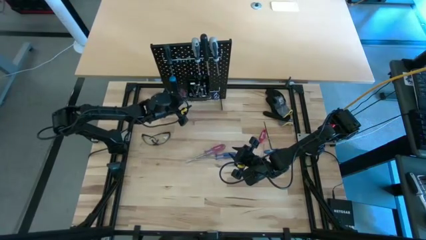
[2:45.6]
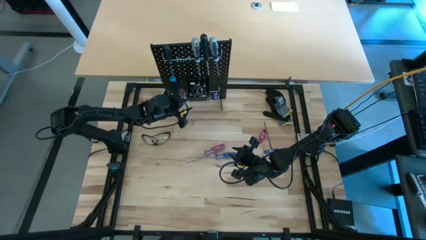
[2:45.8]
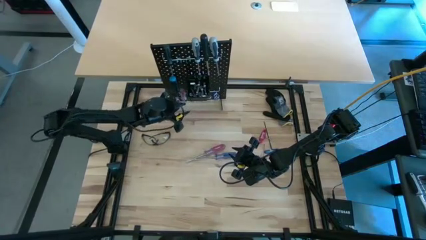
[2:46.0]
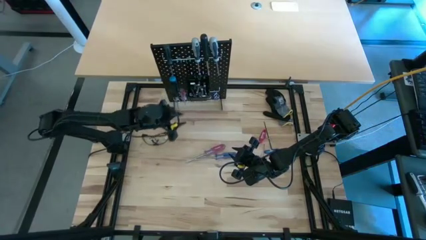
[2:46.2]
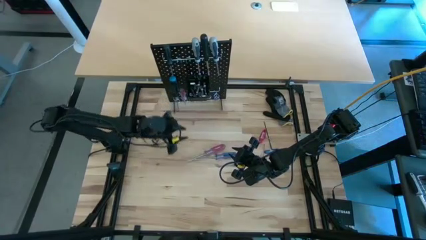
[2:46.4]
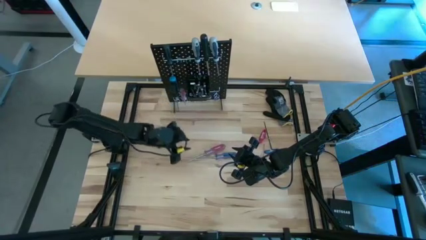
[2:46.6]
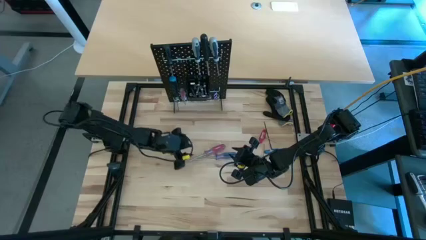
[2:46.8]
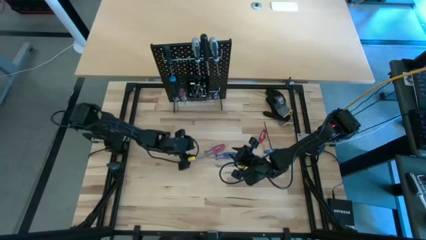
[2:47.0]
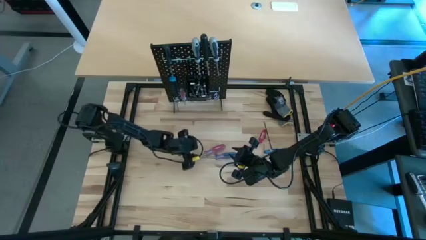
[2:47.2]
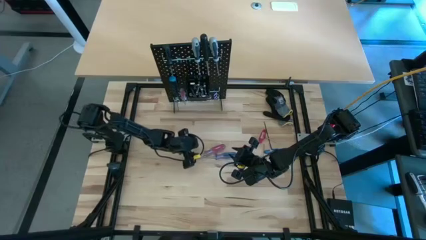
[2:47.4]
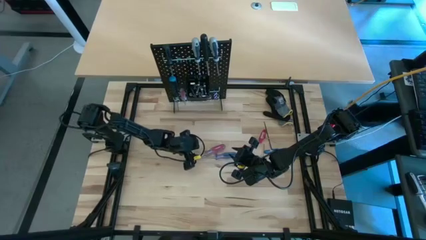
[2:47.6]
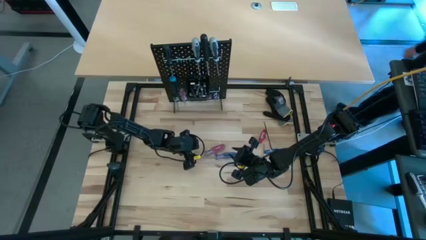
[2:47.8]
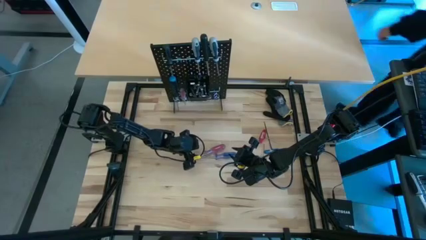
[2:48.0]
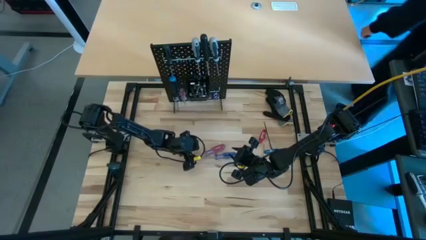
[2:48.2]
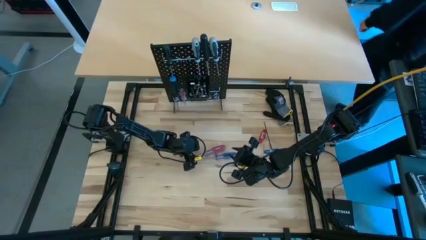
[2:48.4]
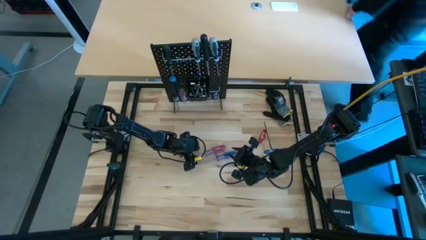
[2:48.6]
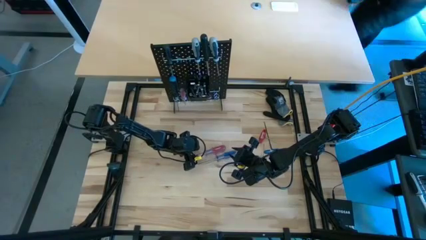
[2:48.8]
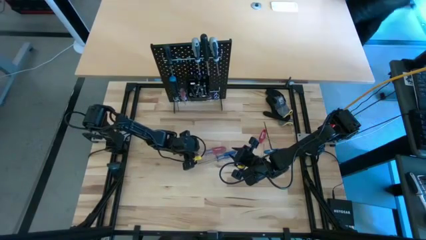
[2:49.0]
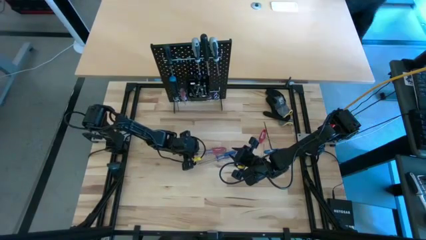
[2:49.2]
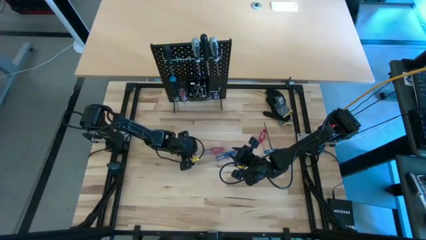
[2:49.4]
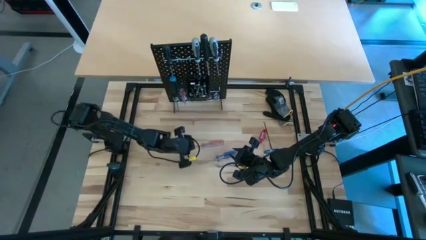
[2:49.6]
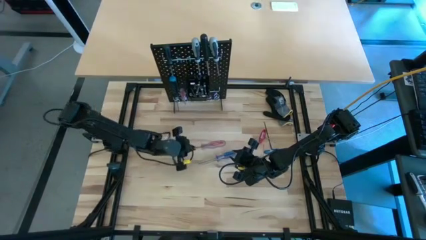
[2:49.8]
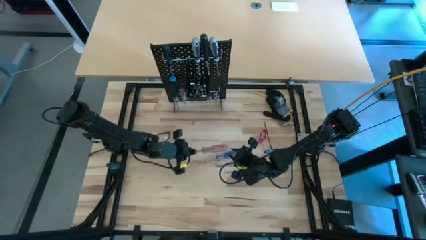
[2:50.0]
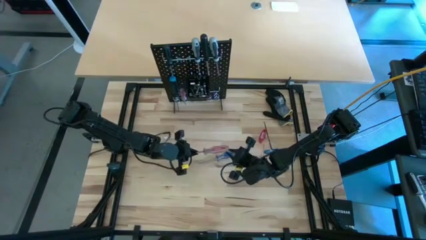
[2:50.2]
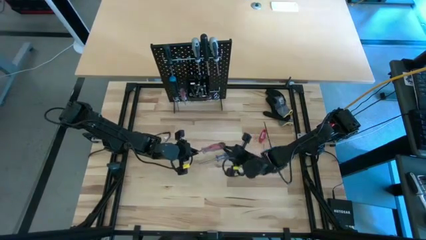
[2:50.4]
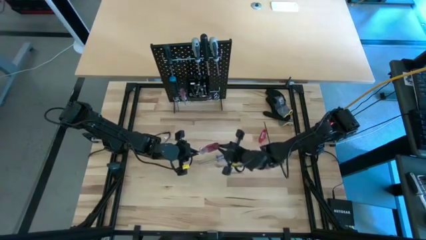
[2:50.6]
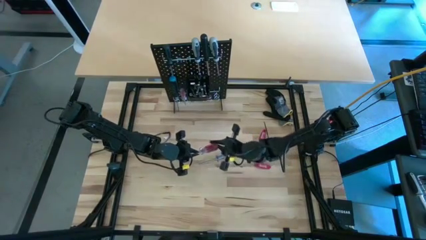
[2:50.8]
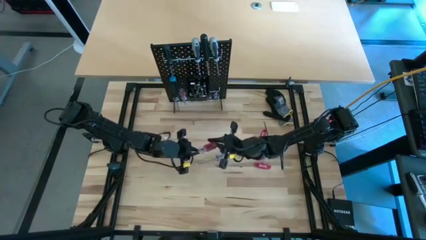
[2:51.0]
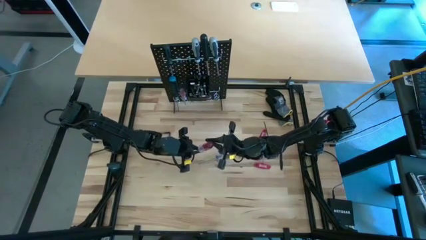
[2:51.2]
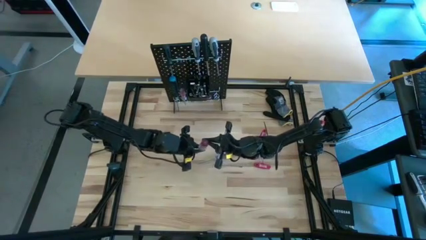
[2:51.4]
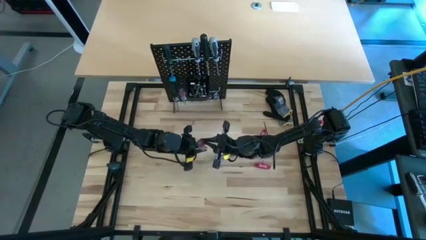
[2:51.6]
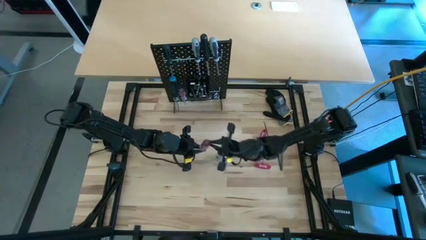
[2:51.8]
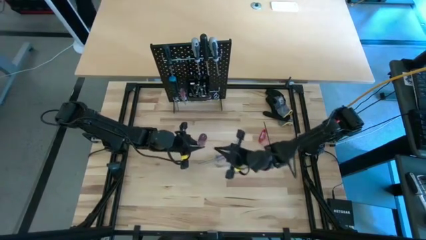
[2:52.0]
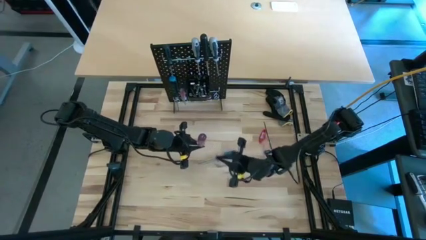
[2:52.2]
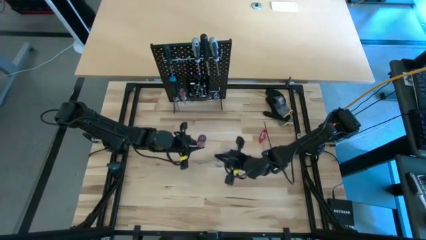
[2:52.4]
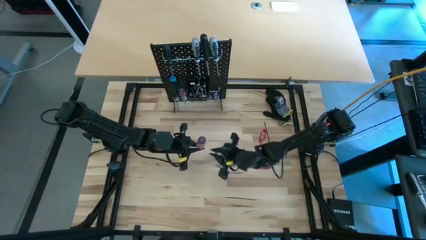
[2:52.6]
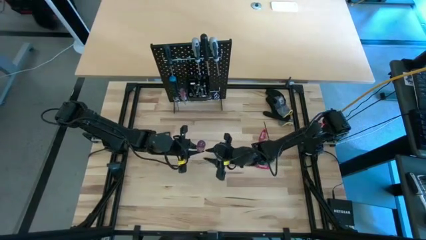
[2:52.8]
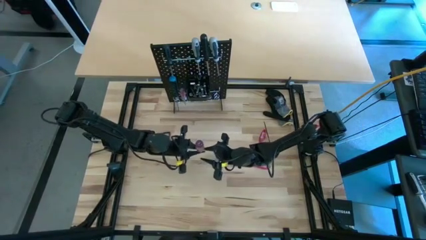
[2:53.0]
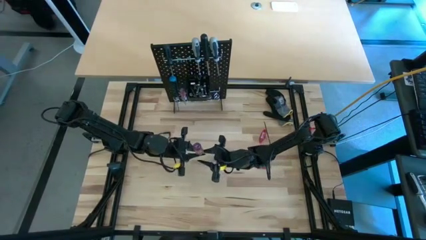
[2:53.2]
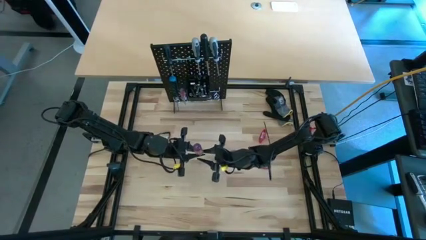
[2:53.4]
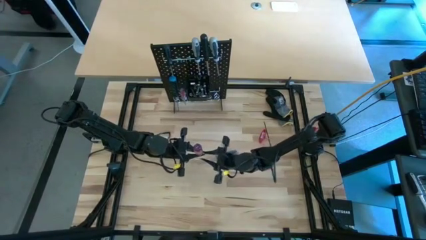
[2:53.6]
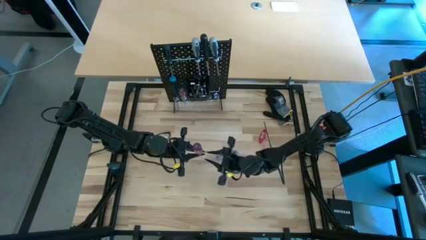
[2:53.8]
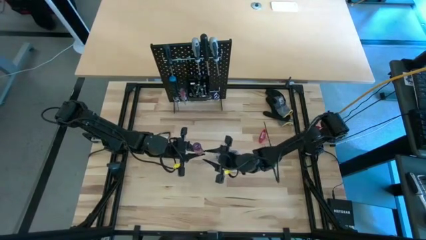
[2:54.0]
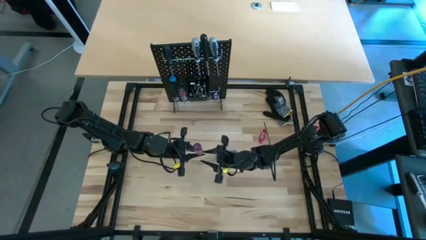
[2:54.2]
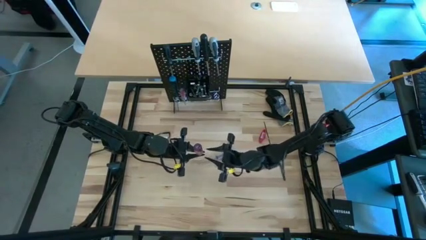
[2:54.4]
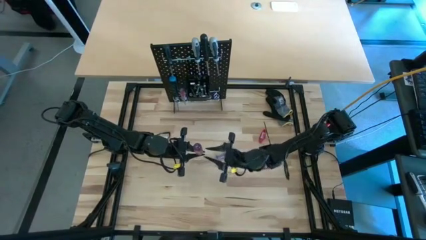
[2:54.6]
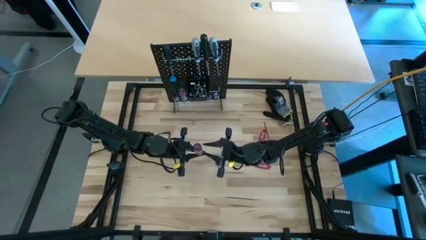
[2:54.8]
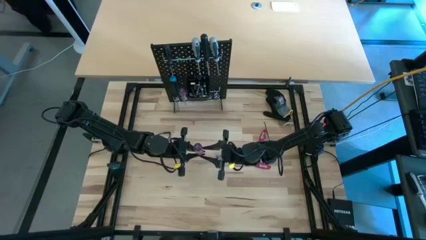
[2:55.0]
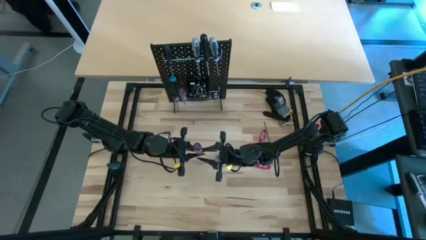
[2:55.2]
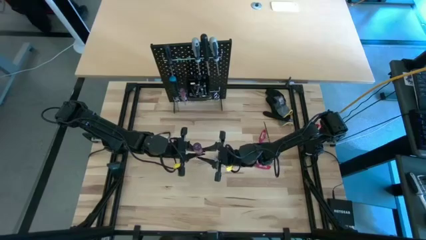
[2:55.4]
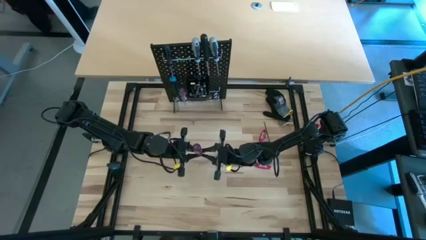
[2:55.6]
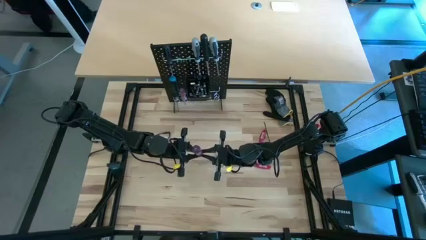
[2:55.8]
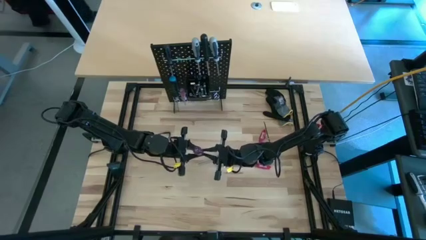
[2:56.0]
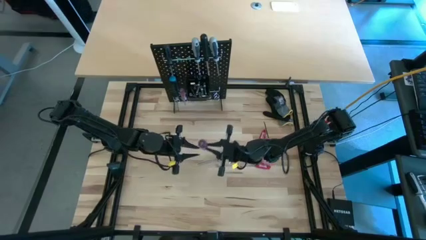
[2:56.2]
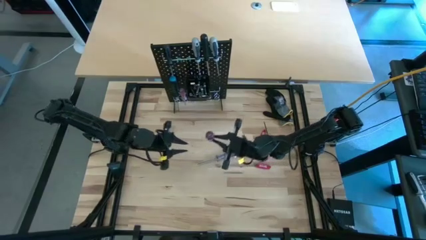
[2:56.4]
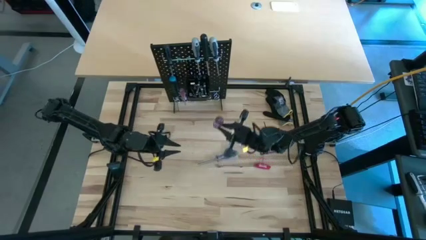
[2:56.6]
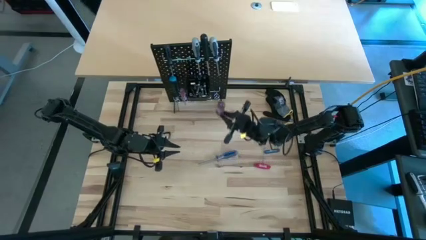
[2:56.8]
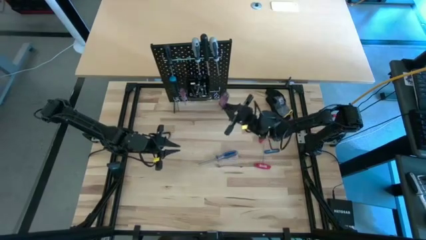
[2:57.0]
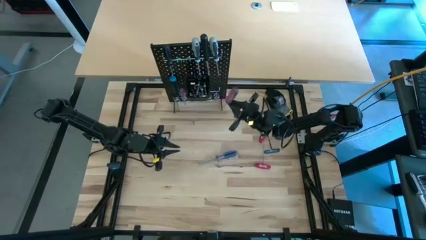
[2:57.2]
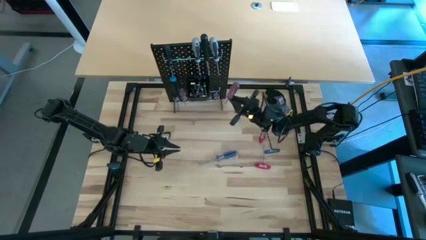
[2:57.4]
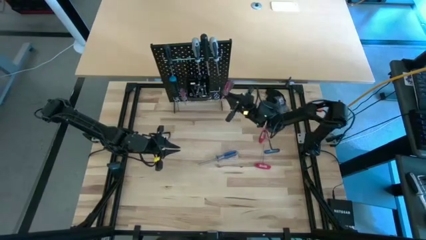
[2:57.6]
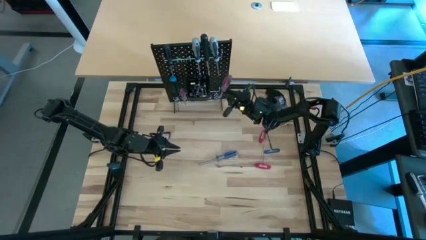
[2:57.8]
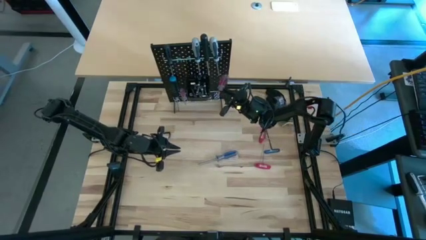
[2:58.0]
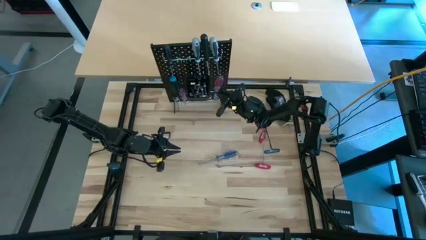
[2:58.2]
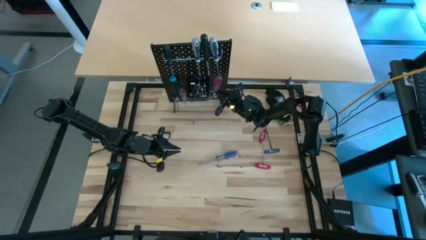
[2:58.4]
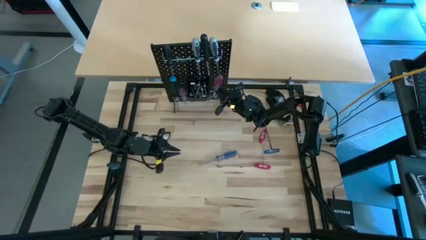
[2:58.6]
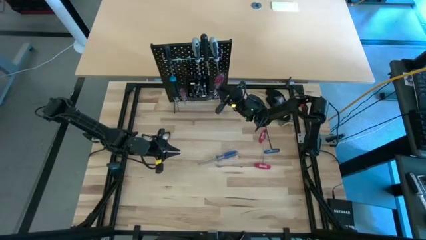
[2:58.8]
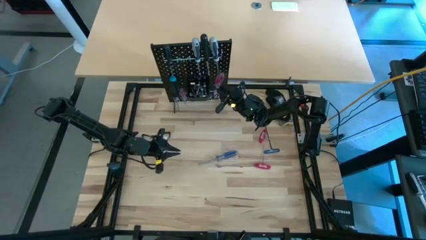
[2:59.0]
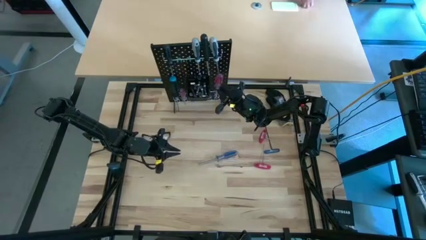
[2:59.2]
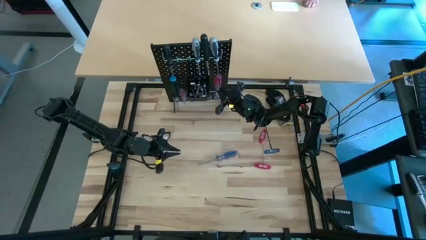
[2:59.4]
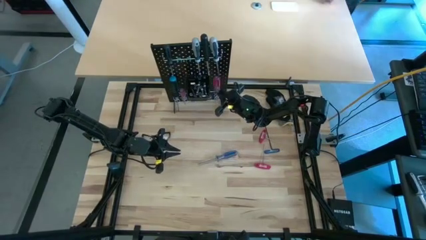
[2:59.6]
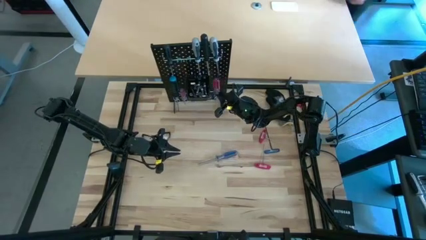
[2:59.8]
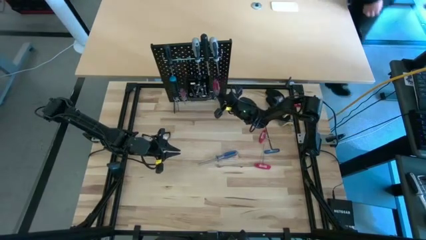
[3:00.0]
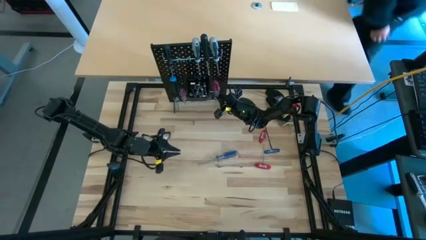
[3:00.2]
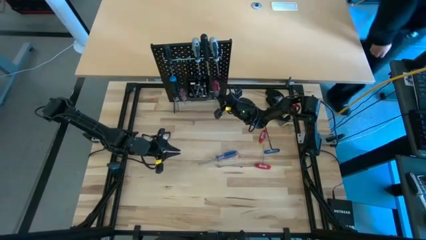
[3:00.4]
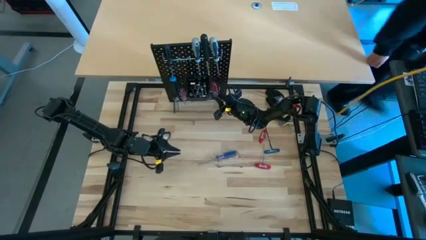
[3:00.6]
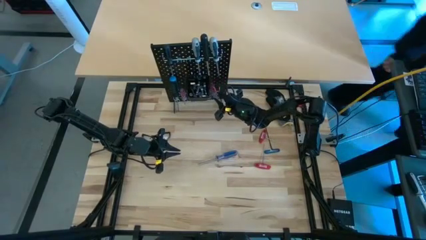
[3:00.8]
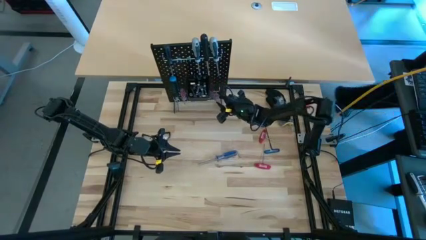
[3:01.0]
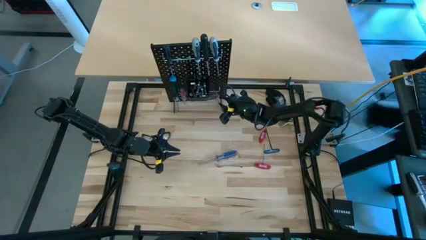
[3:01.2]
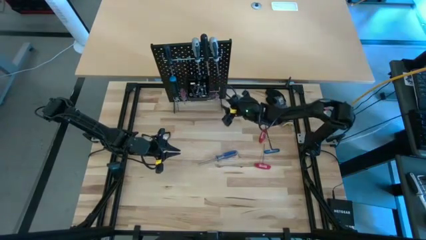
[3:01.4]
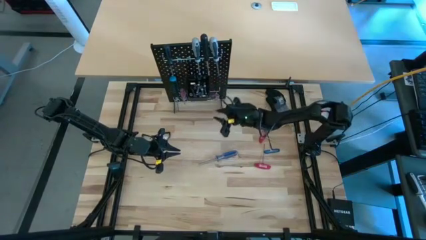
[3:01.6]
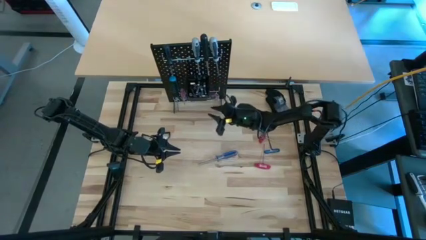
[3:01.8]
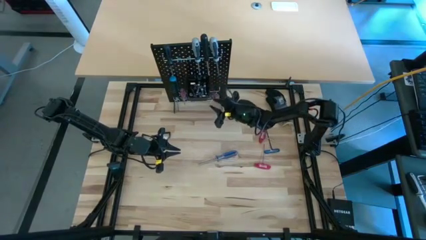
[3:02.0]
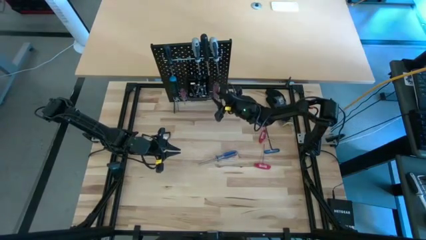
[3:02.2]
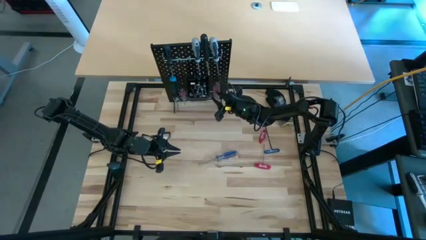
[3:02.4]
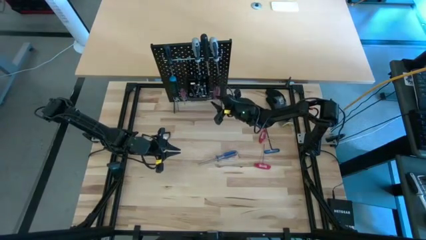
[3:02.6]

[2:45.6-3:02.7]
Task: Hang tools onto peg board
Hang the red and transparent screwdriver on the peg board
